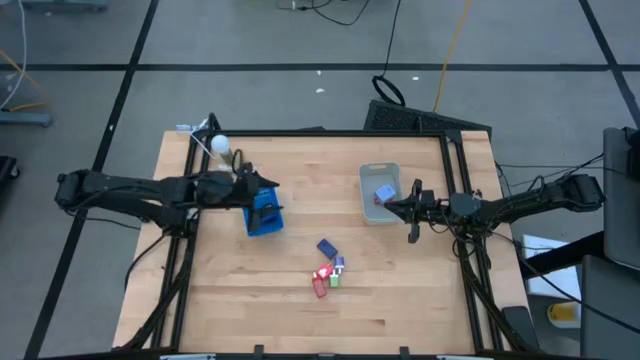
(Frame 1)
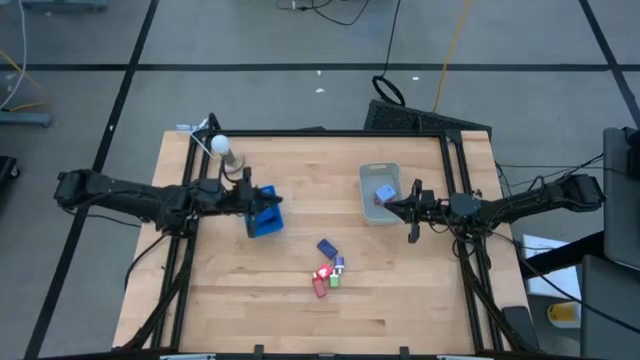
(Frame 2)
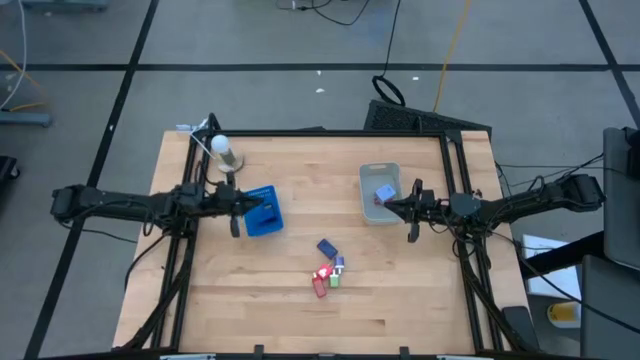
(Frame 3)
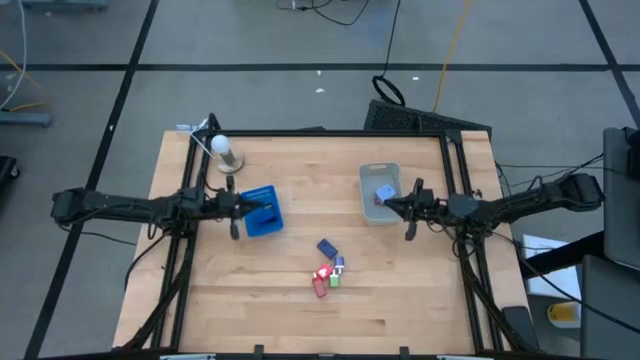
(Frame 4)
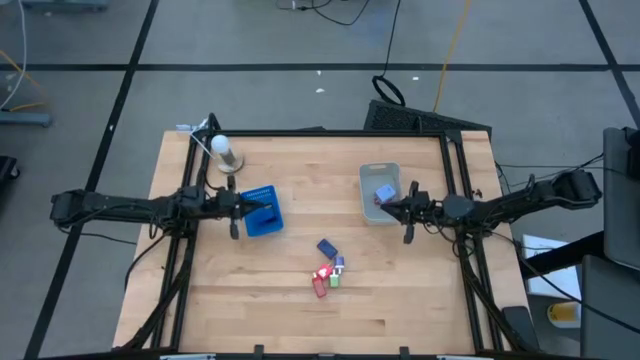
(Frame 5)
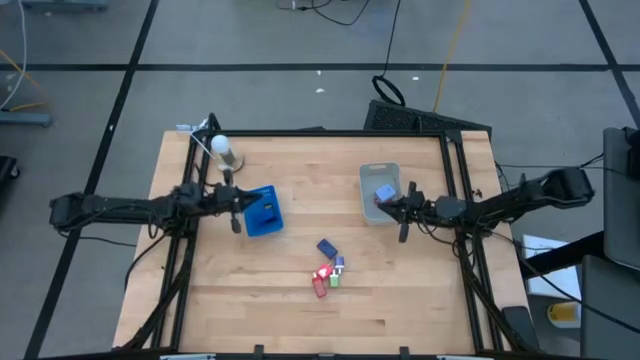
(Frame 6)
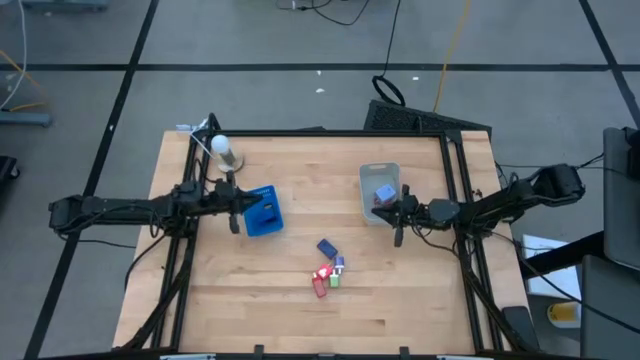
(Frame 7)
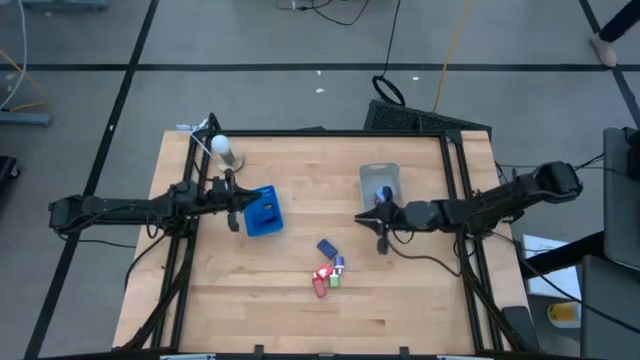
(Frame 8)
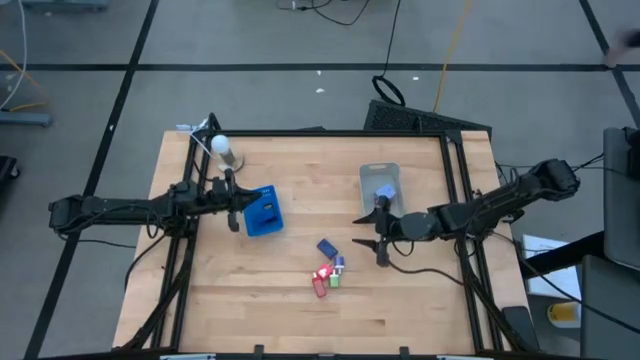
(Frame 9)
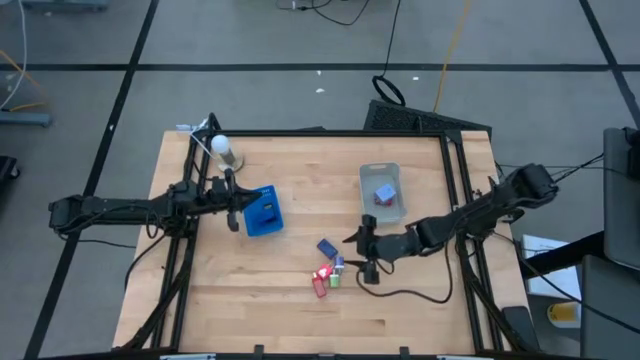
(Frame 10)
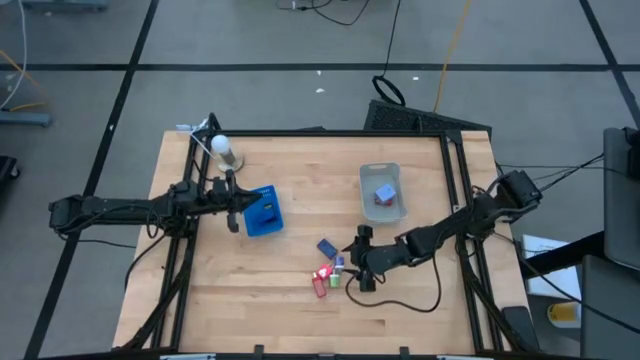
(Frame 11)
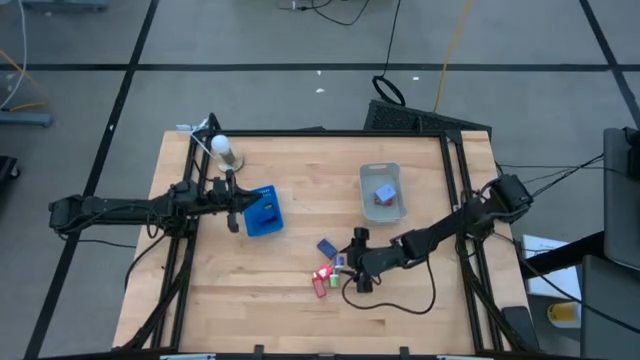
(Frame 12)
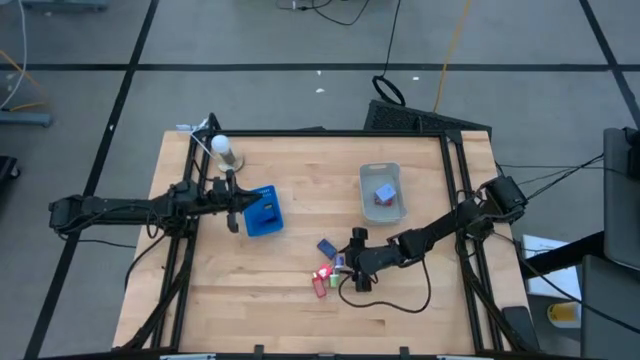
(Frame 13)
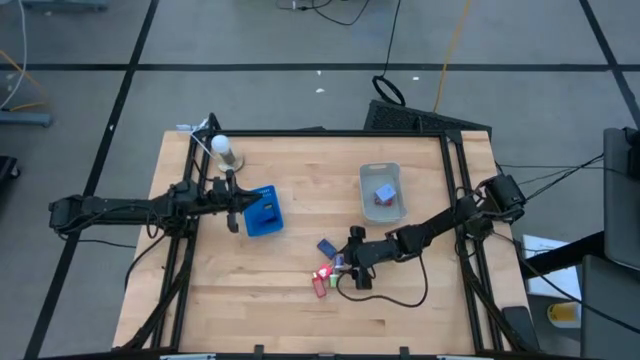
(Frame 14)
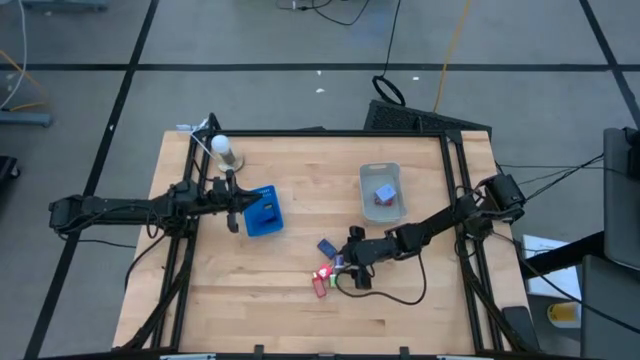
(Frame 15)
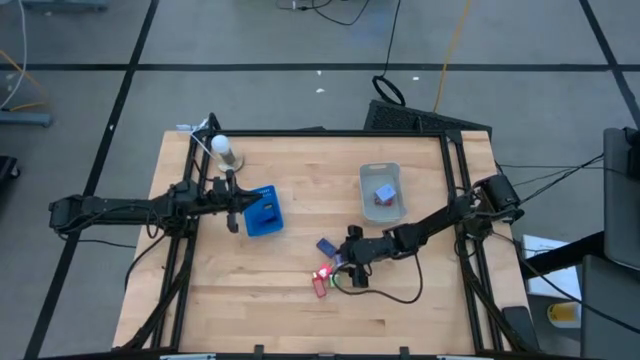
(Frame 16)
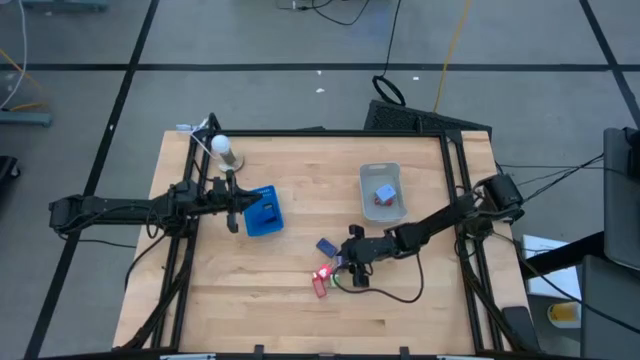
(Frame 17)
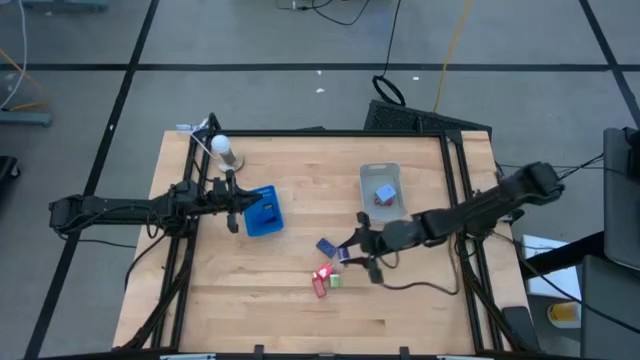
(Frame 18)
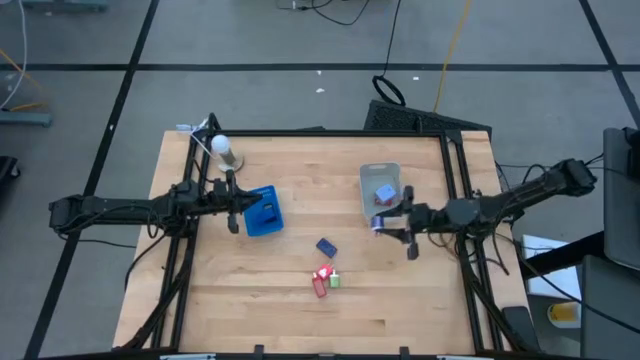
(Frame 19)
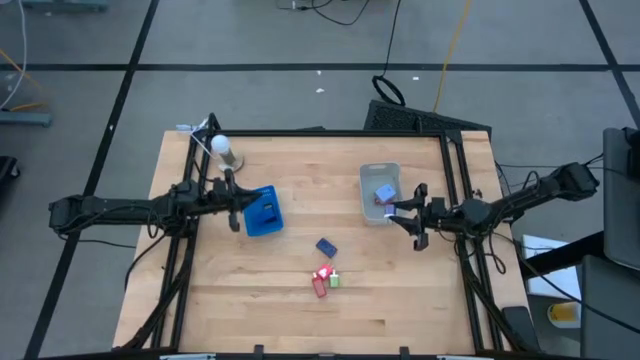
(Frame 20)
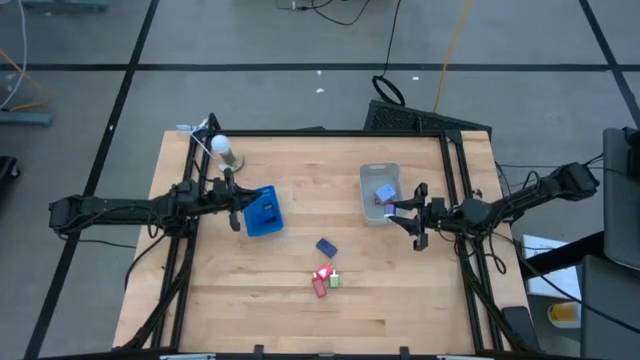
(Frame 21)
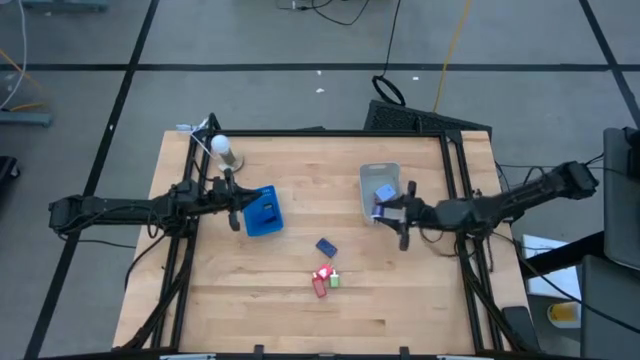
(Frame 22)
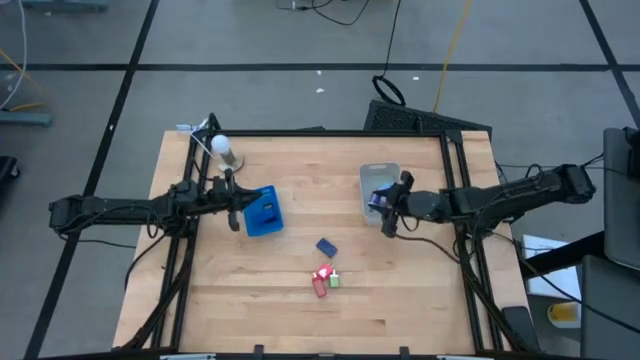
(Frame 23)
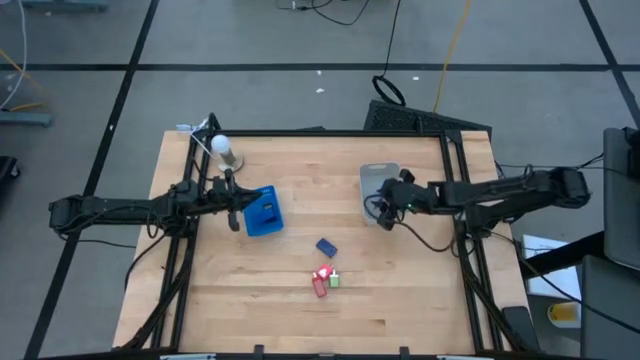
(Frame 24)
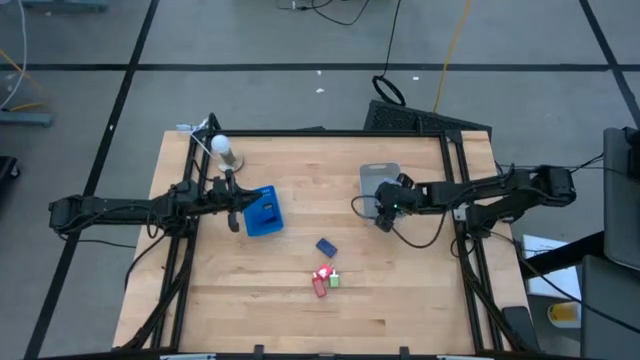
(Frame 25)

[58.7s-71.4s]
Task: Pick & Place Office items
Put the blue charger adapter into the grey bin

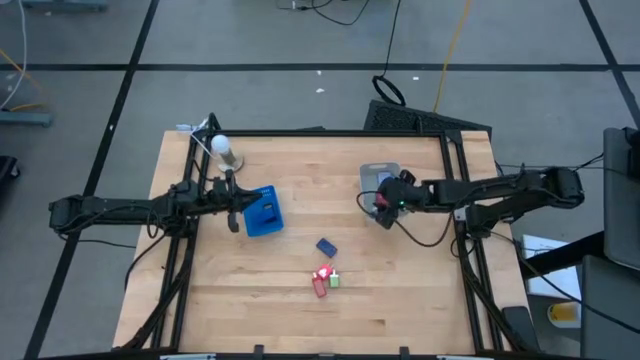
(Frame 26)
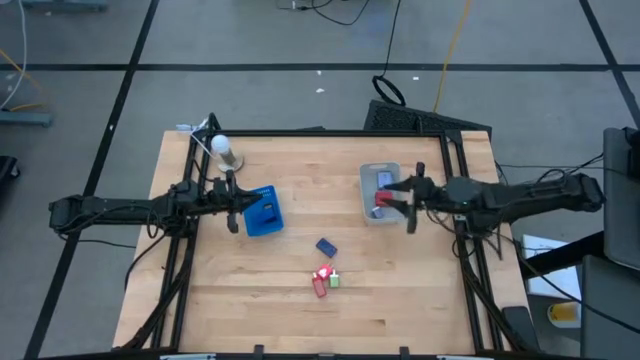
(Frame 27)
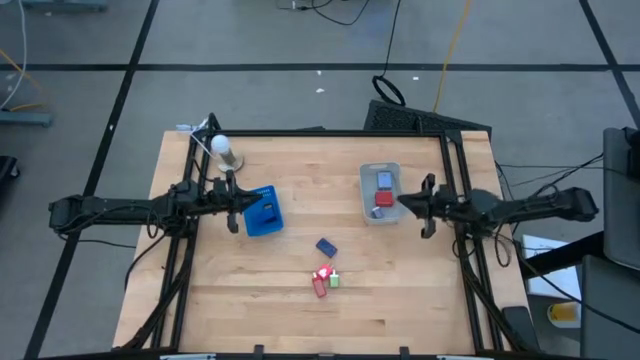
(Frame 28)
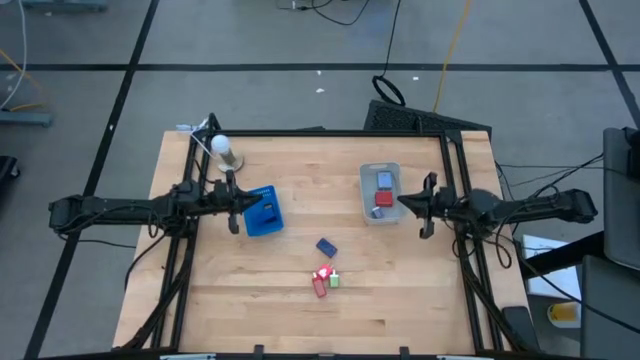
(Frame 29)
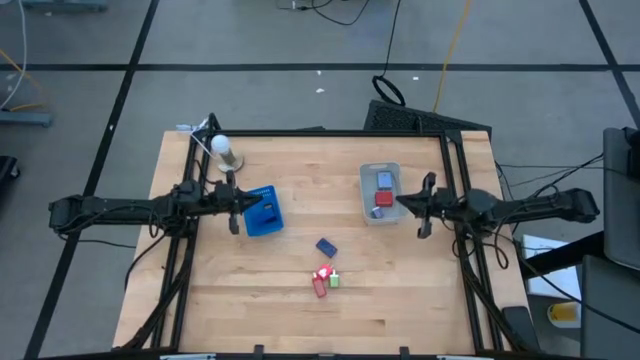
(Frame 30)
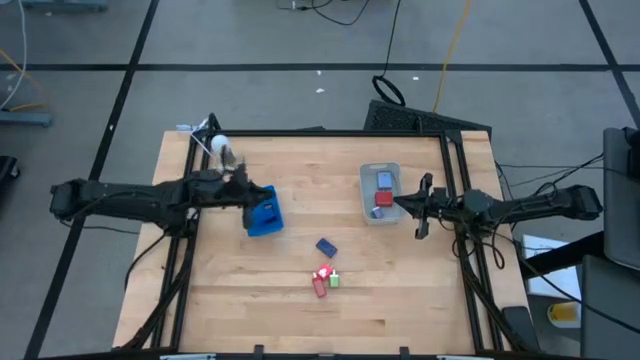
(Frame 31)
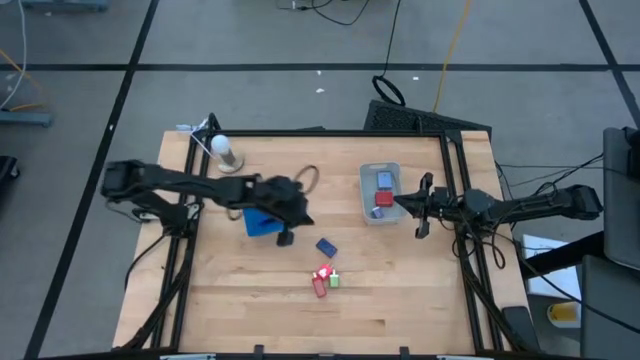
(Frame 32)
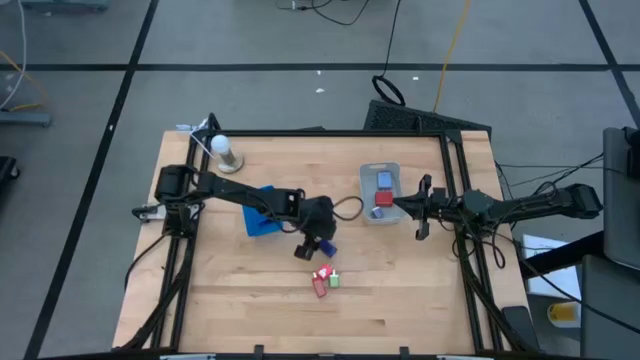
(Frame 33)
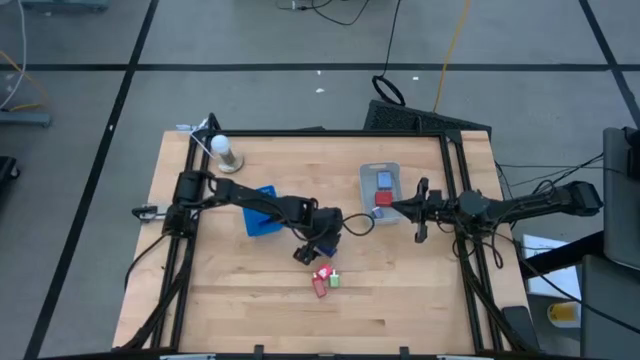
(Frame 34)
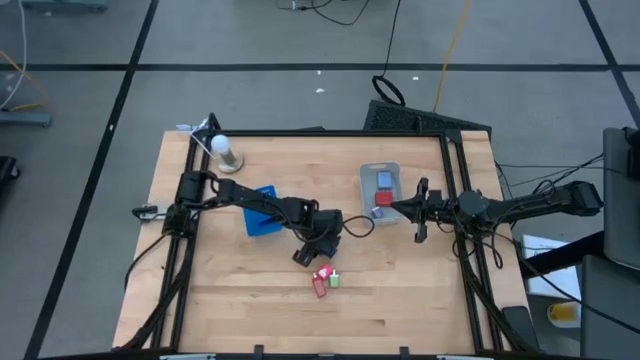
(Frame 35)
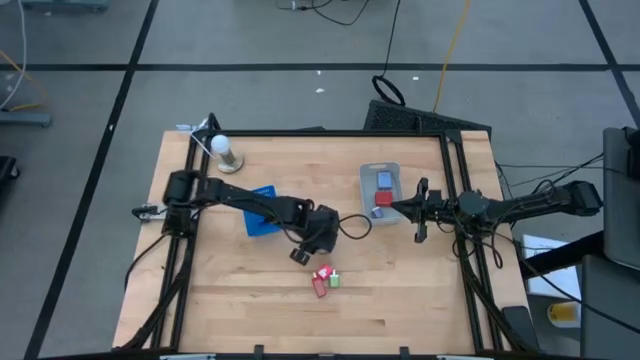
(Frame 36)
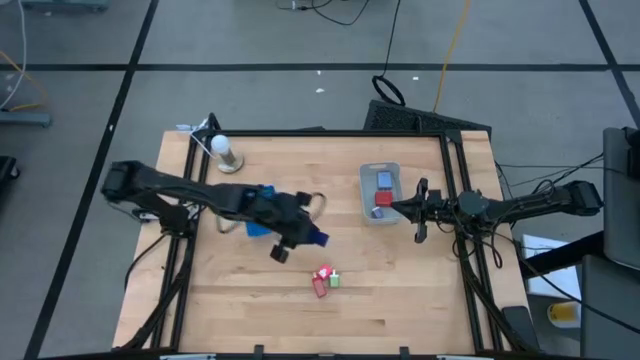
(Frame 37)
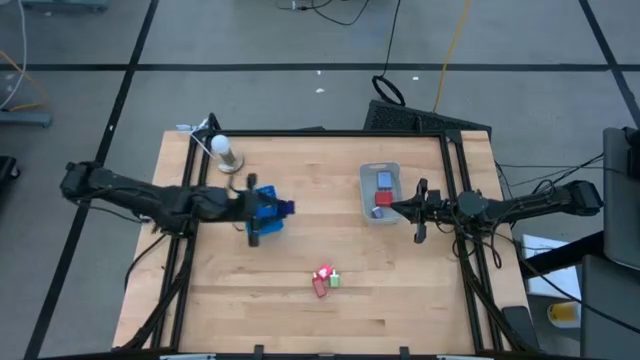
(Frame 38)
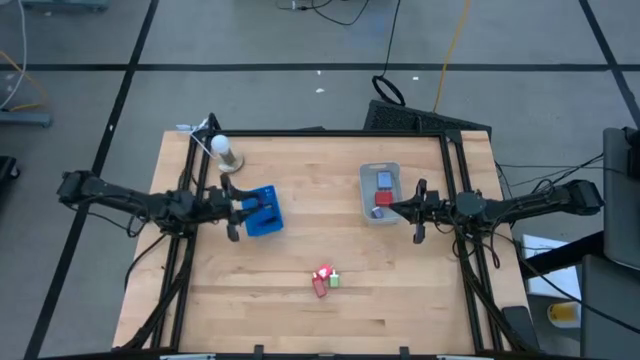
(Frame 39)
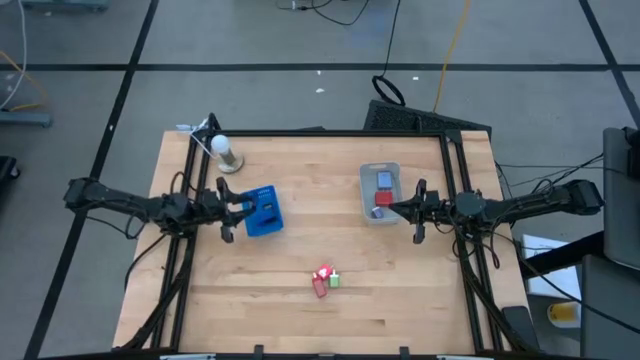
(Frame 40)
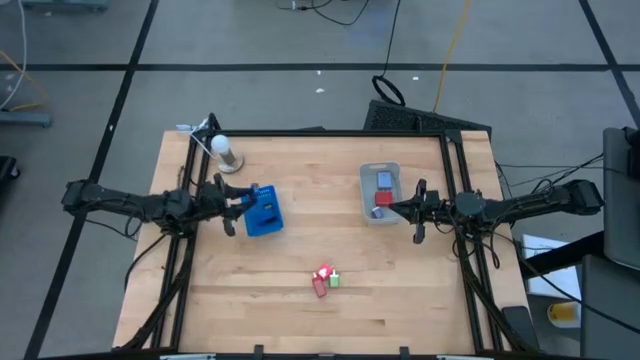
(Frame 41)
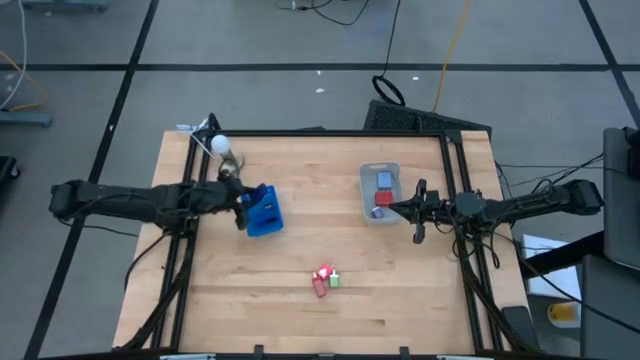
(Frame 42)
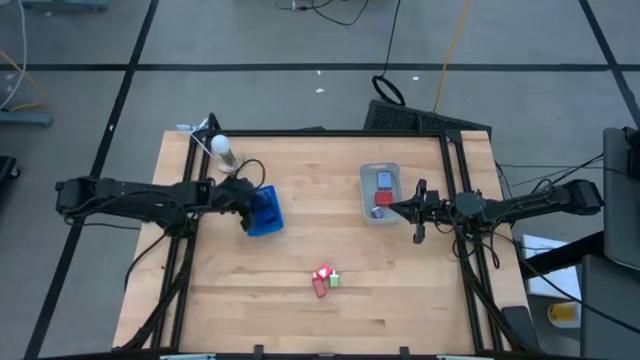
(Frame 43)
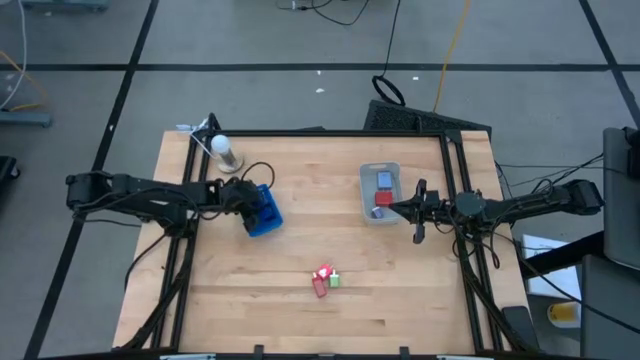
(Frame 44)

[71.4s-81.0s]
Put the blue digital timer into the blue bin
